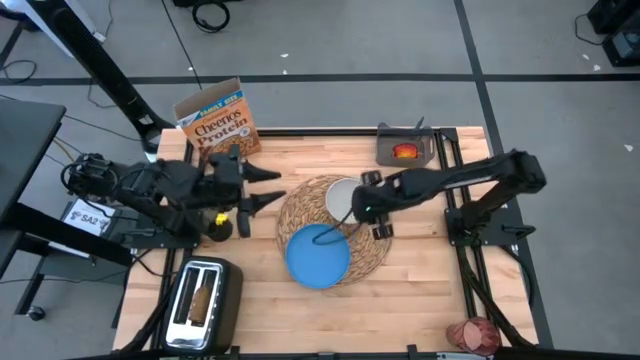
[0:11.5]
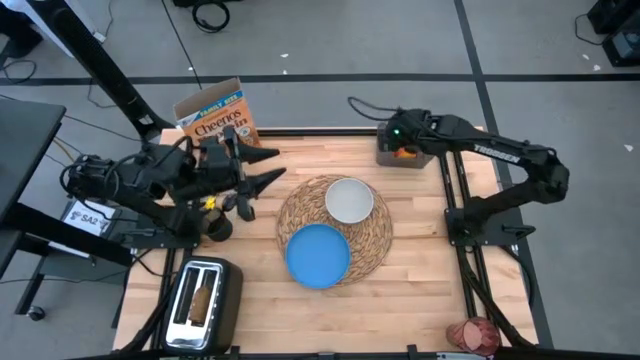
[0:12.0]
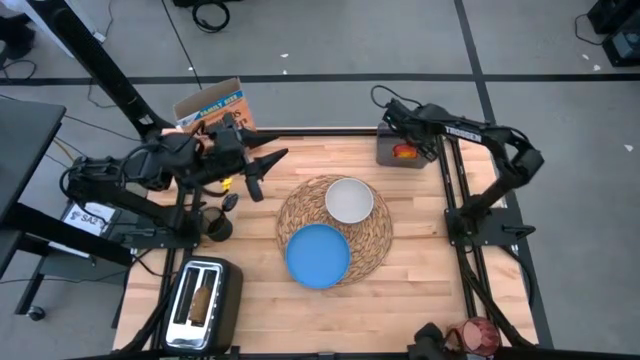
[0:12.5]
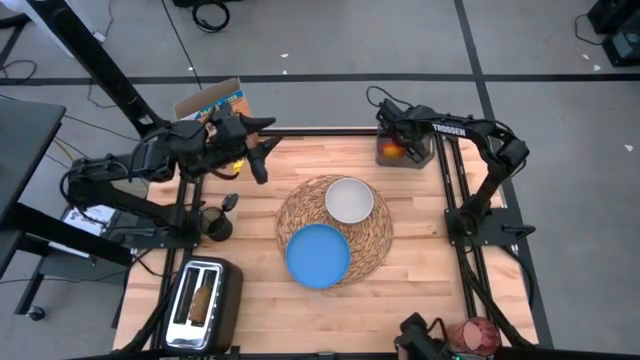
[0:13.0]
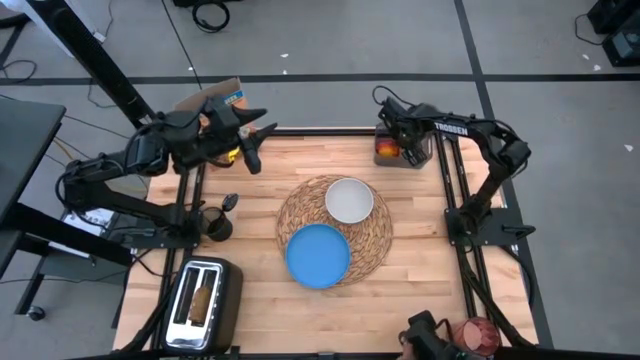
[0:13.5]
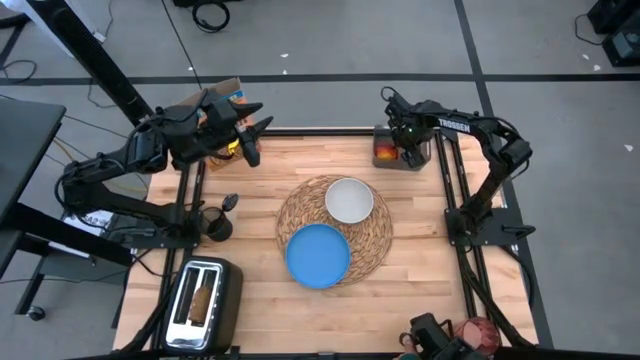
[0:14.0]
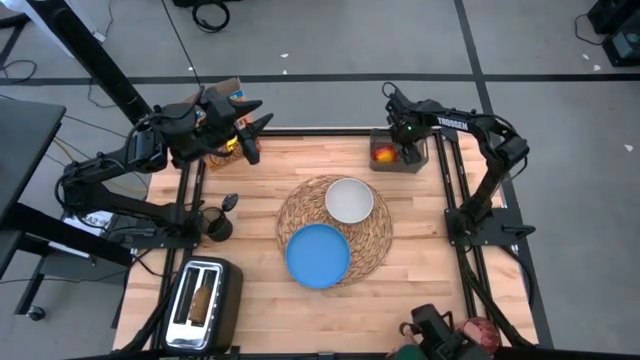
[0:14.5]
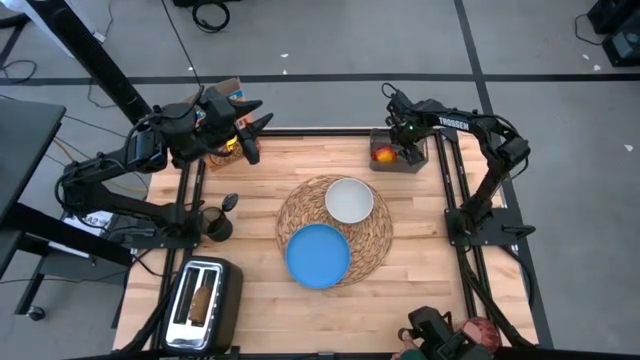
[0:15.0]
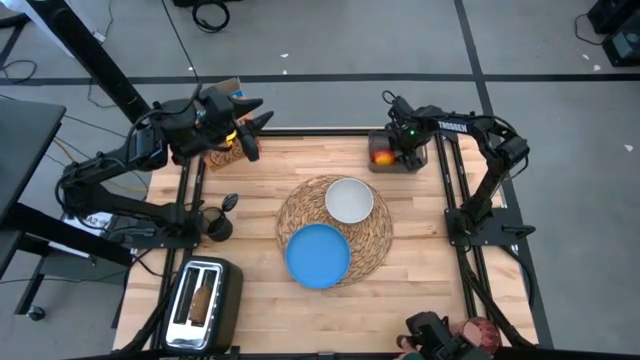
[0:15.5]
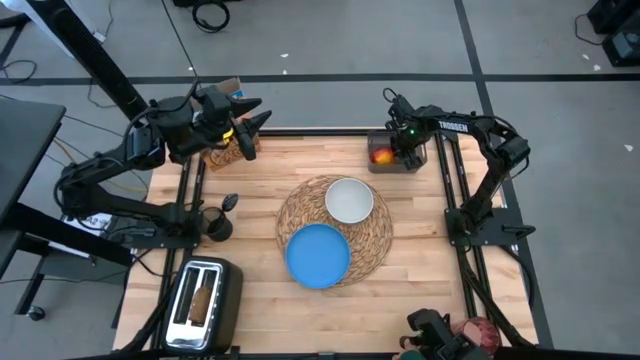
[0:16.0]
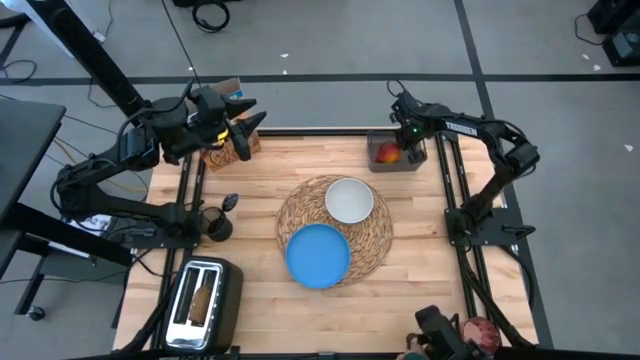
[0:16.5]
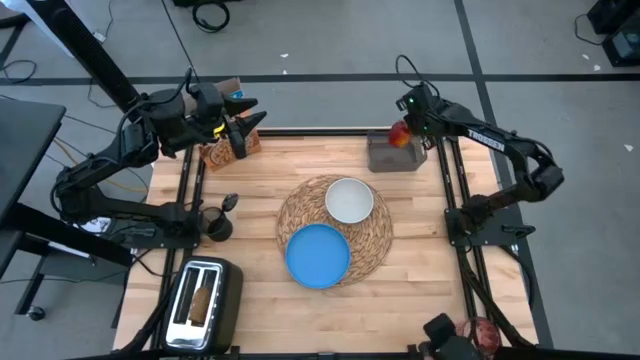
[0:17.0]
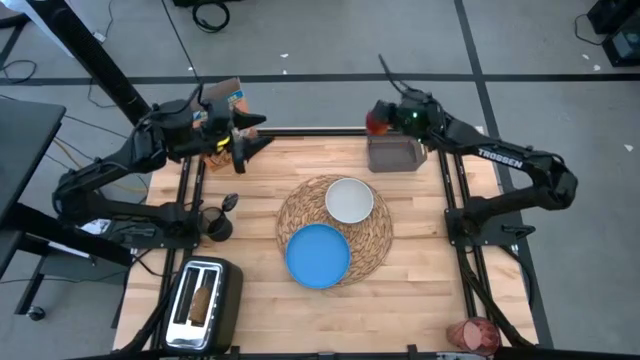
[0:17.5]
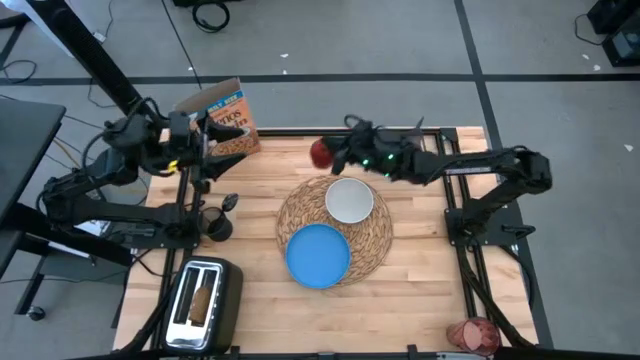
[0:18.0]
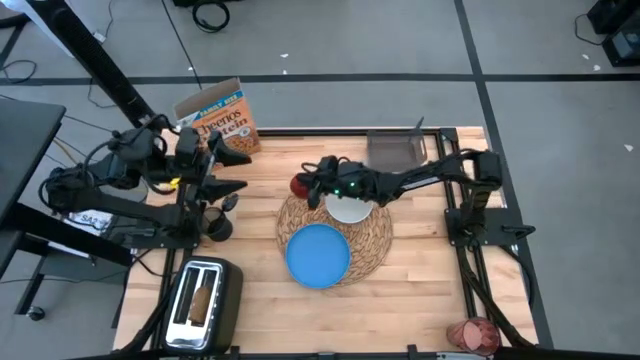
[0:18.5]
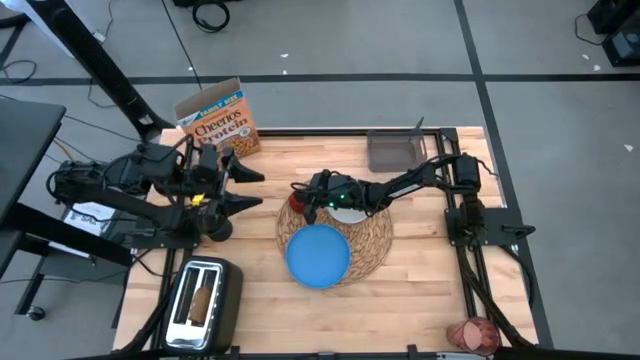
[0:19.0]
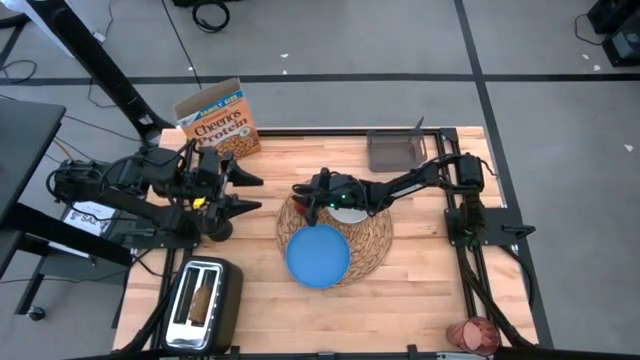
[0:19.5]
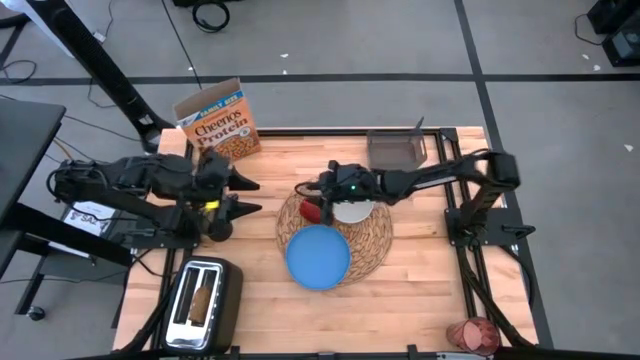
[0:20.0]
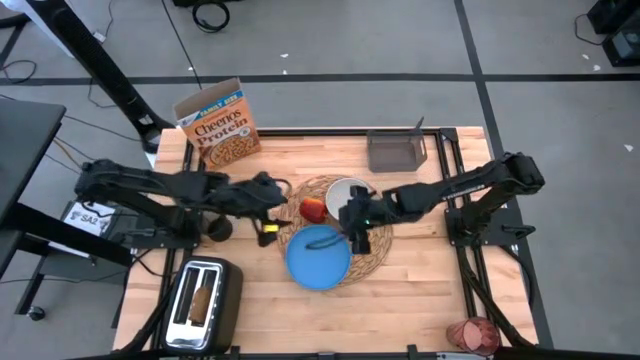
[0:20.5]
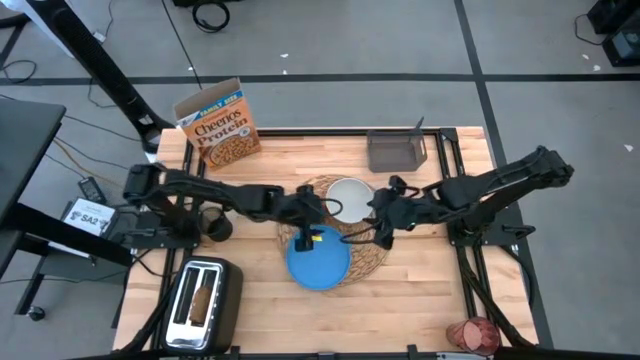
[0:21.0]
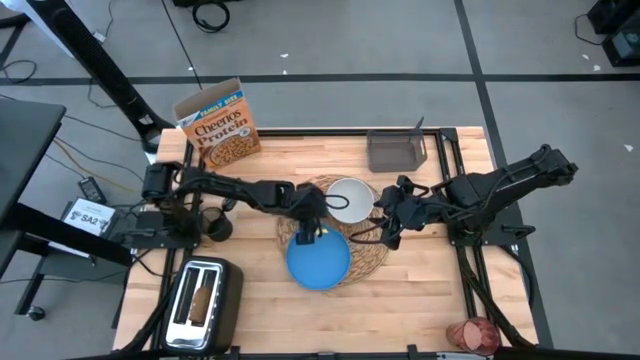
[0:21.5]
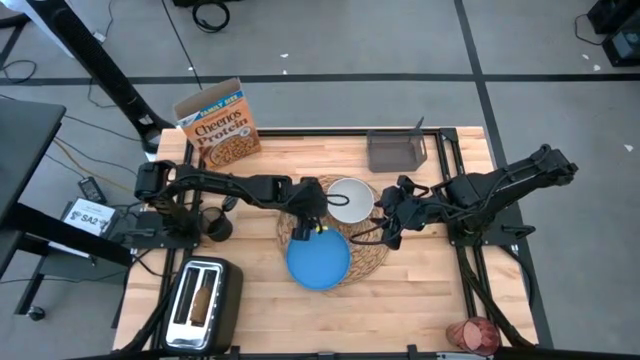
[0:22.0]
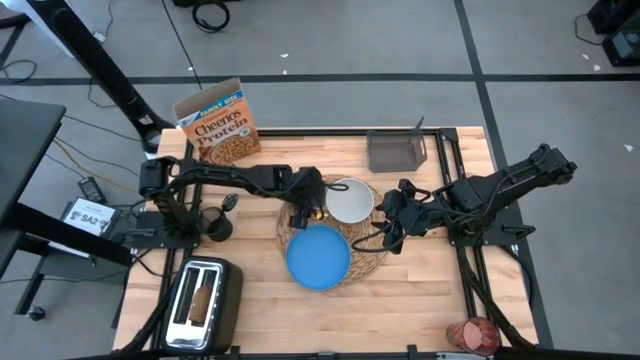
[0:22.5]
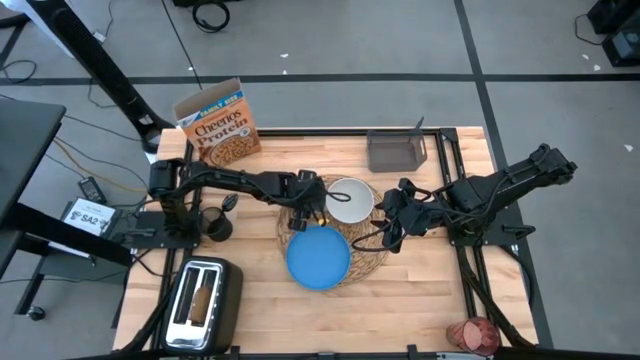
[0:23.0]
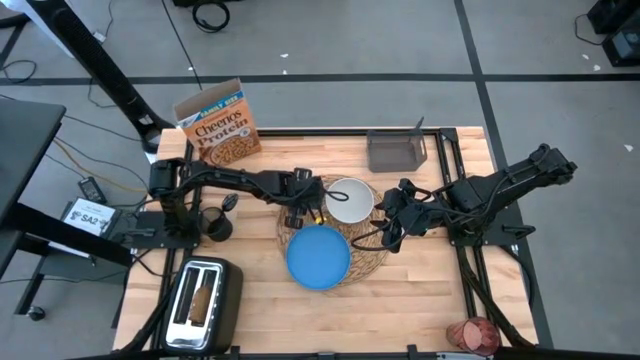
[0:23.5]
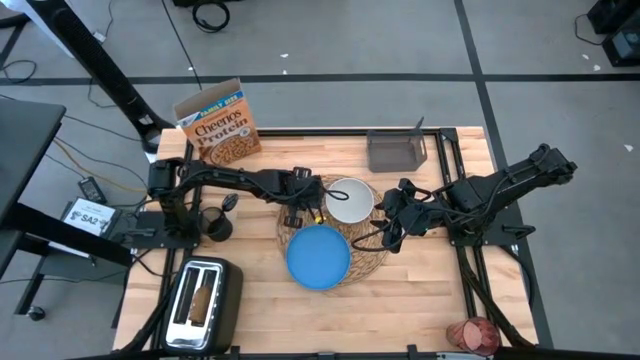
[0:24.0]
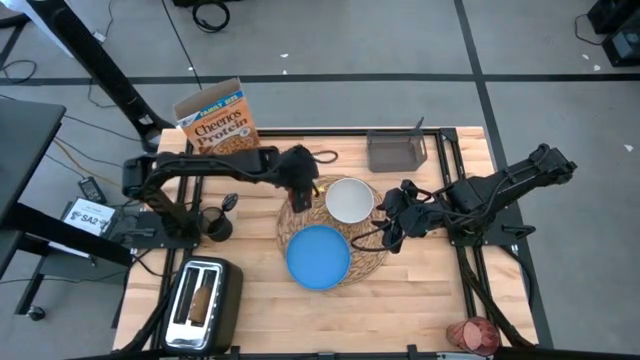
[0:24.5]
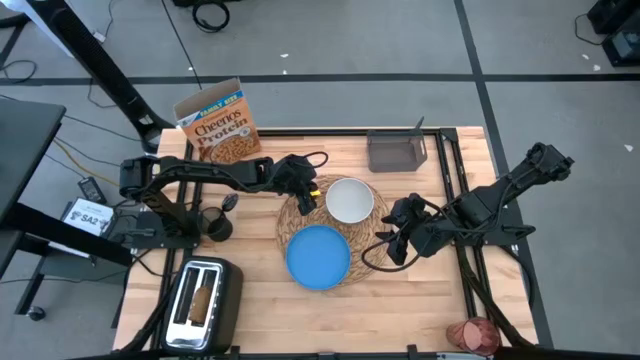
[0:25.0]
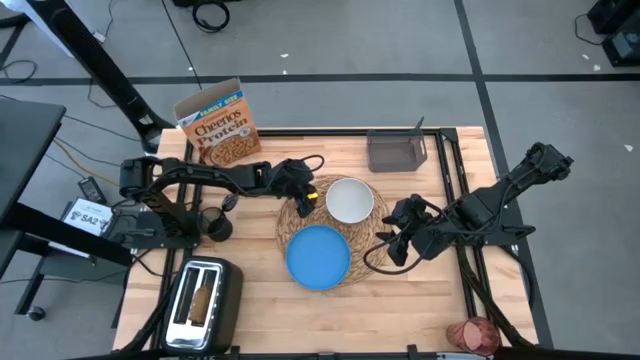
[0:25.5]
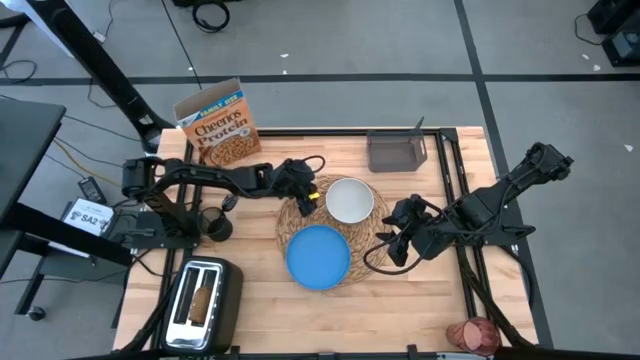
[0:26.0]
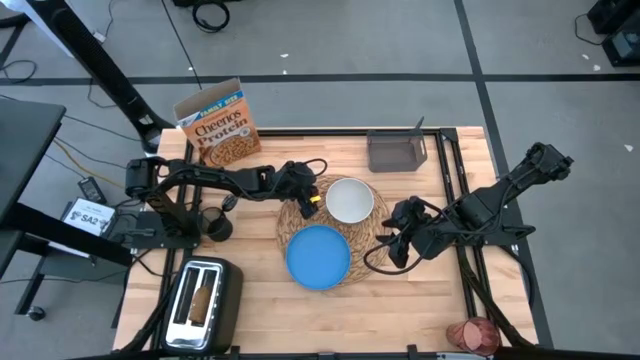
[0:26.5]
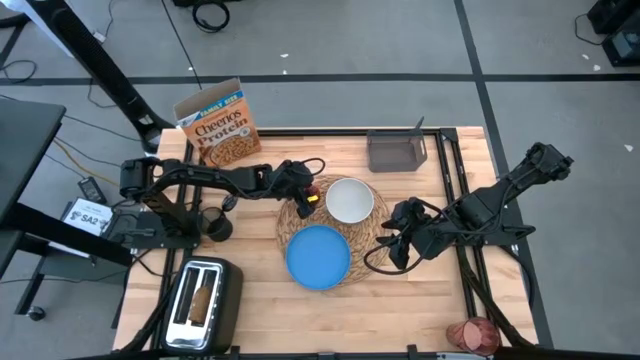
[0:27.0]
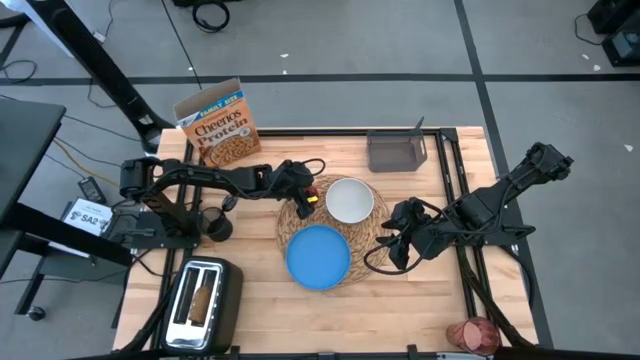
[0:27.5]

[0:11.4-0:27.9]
Task: Arrange a breakfast setting
Put the apple on the brown placemat

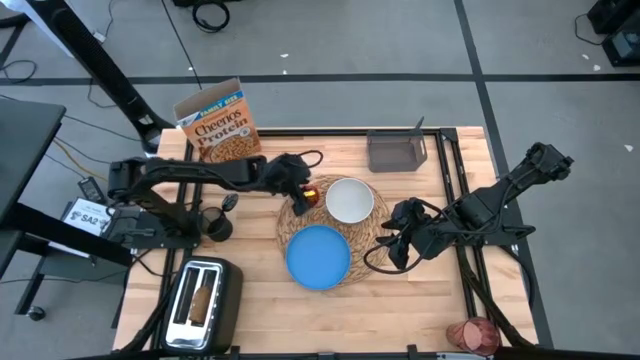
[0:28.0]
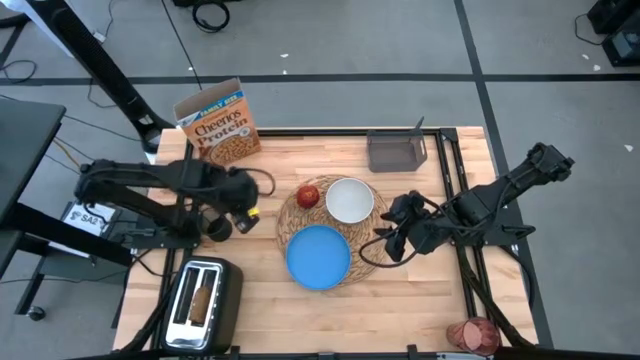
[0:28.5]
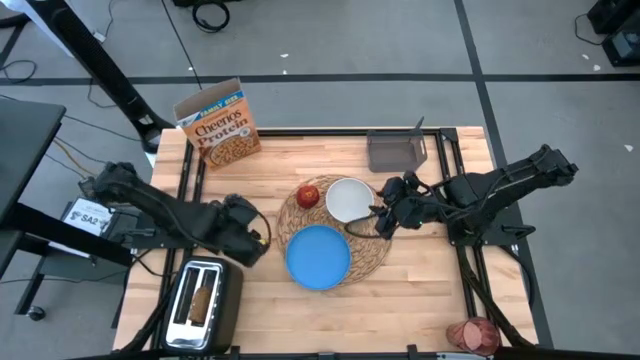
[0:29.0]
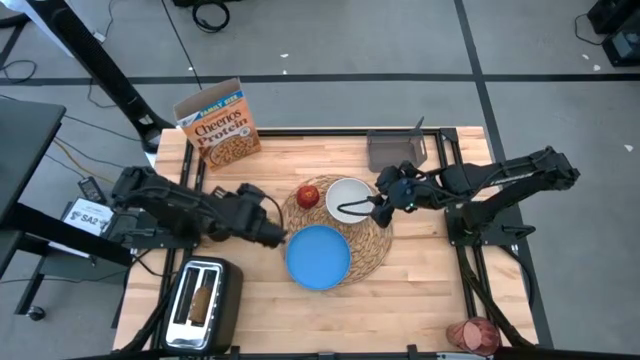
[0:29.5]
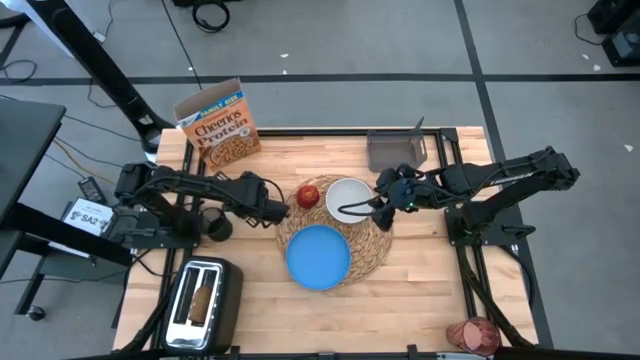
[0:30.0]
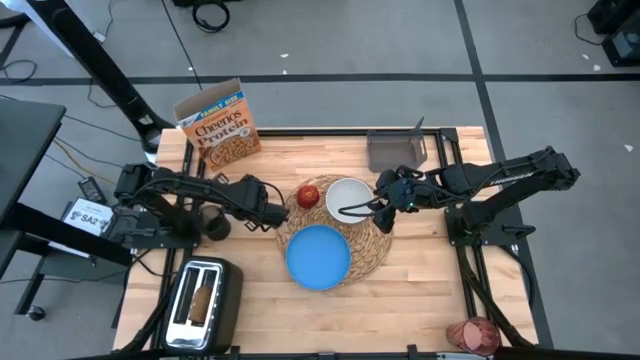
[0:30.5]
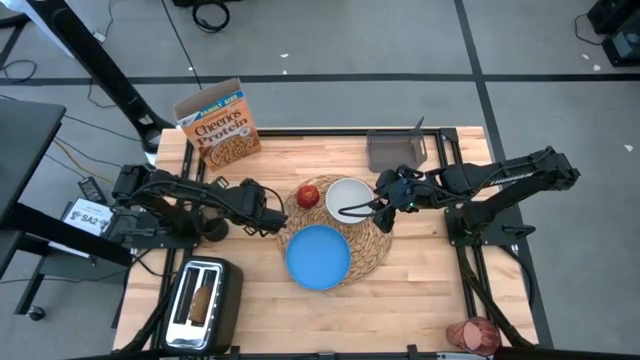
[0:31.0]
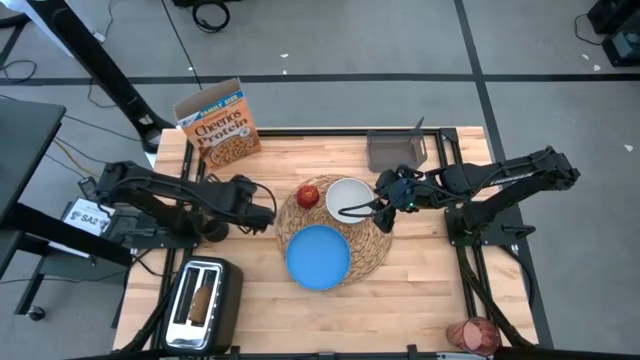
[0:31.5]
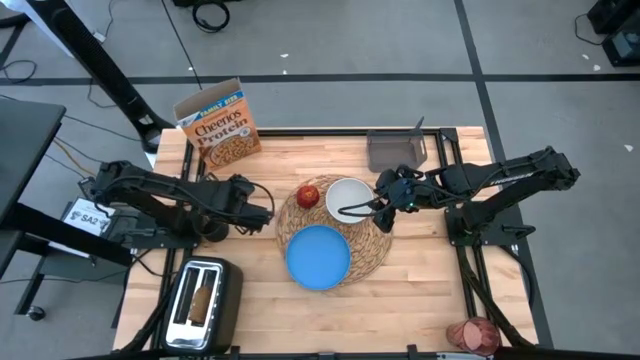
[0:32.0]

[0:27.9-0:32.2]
Put the black spoon on the brown placemat beside the white bowl
